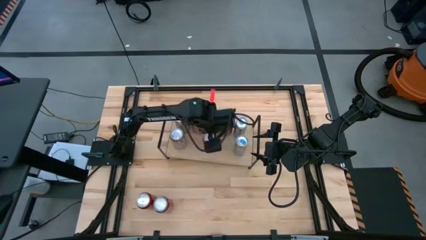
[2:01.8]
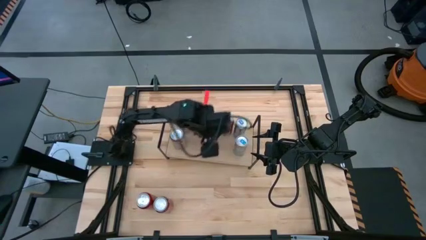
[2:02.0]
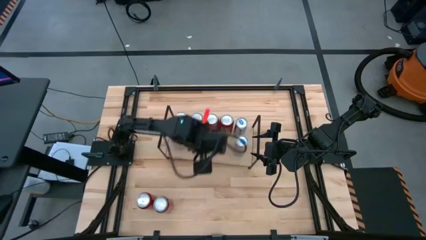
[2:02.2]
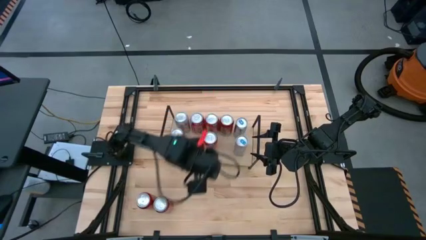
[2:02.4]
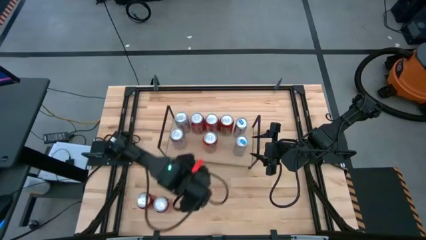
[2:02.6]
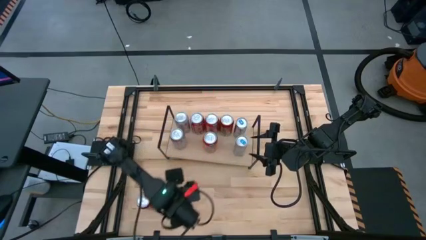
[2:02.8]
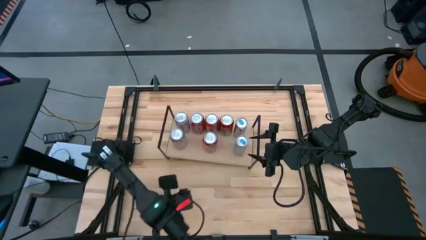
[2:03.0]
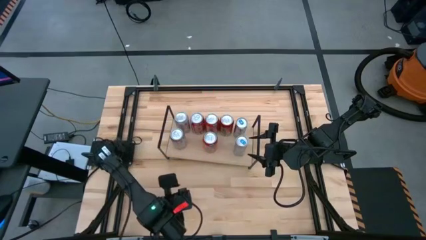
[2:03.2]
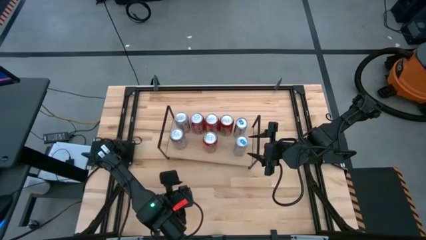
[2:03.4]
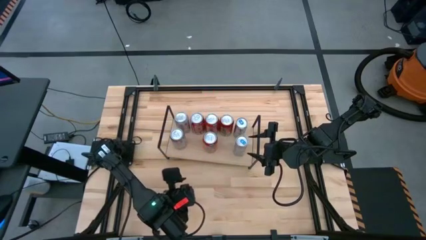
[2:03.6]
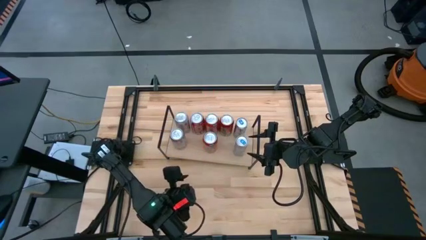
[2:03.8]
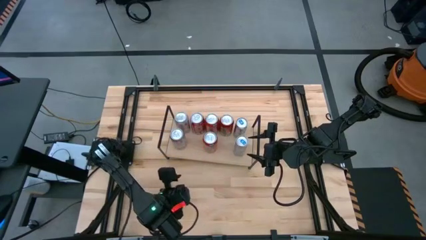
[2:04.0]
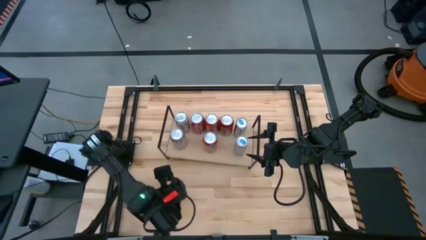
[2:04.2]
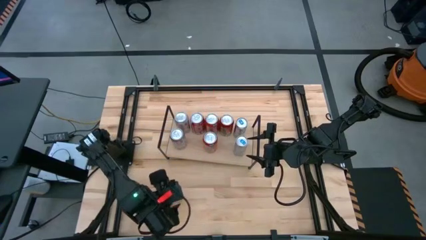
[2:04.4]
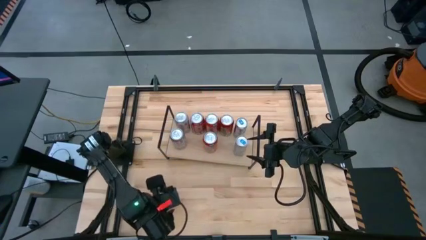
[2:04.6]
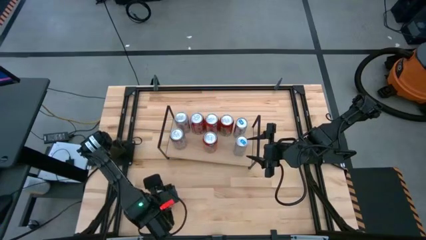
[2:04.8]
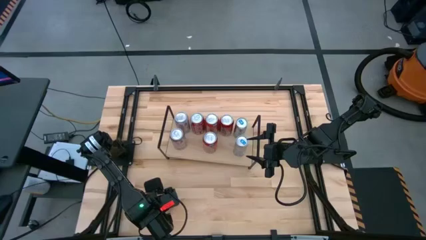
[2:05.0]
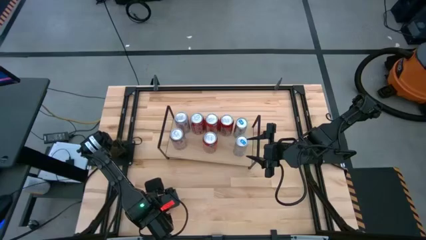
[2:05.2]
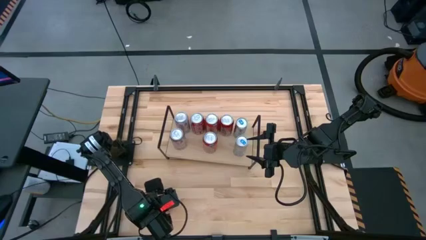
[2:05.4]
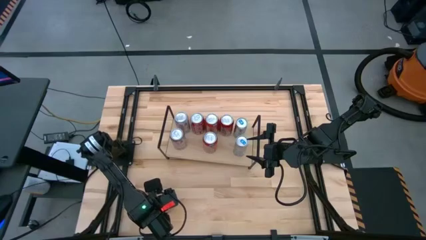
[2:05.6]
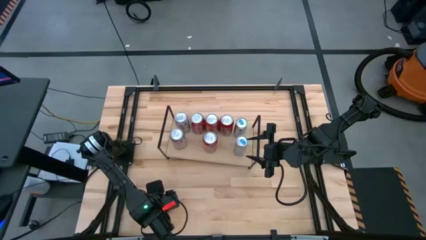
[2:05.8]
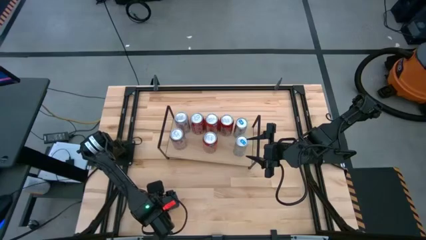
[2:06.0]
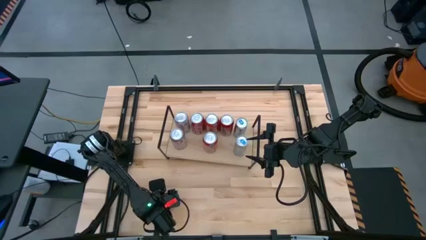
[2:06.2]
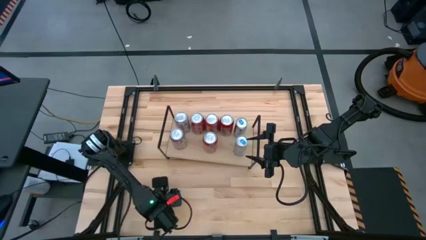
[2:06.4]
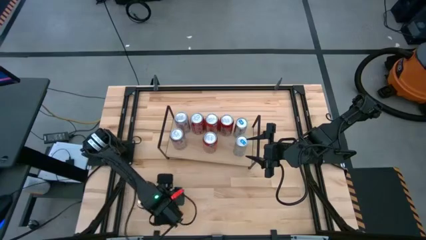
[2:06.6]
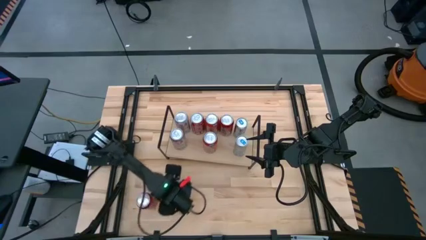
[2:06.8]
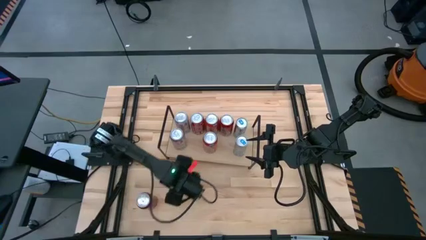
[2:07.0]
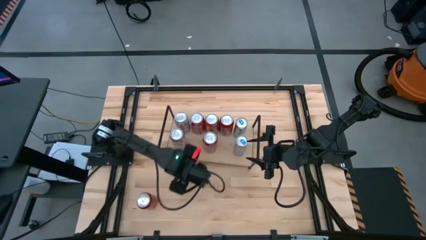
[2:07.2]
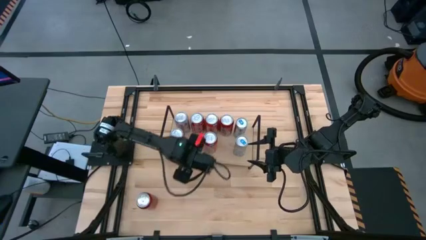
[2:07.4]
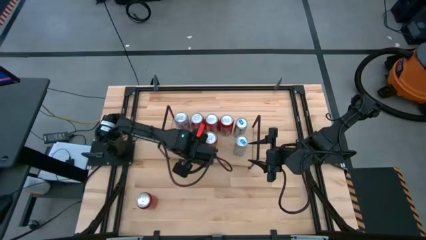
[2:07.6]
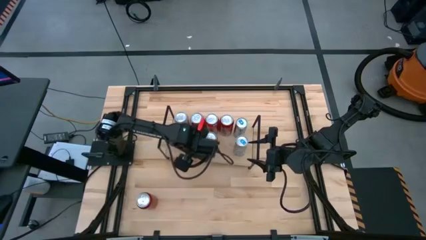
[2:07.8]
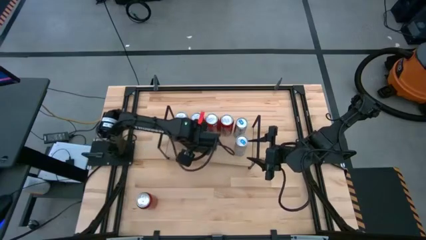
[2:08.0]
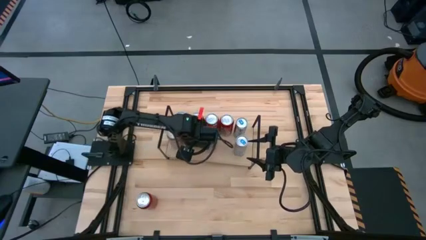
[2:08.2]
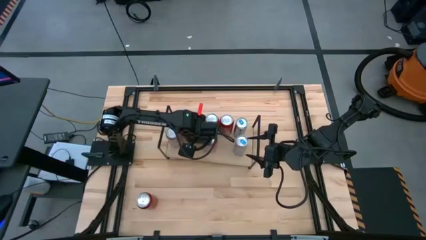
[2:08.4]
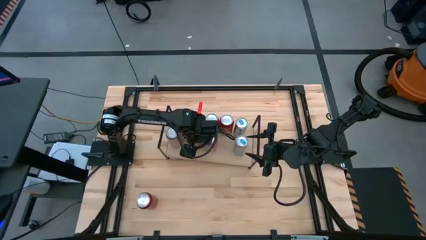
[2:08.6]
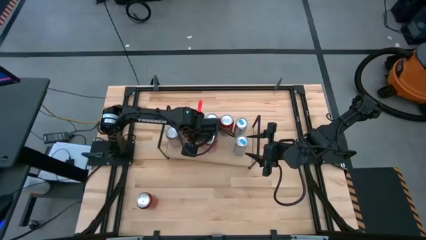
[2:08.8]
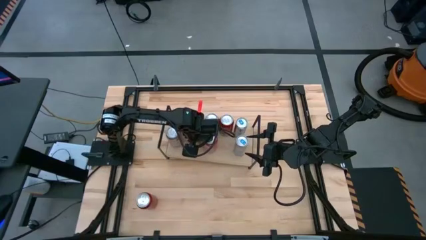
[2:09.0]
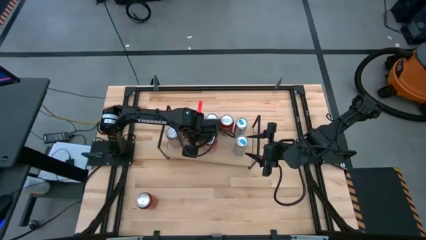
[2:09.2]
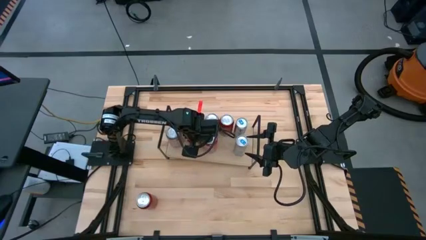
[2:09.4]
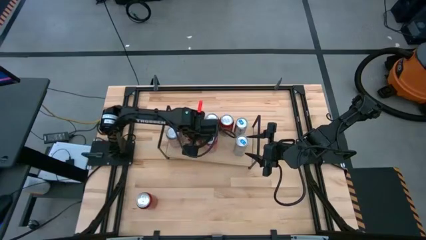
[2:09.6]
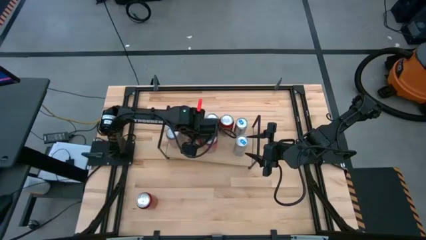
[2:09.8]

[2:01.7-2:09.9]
Task: Place canned beverage on shelf
Put the red-white soda can on the shelf aligned with the other red-white soda can

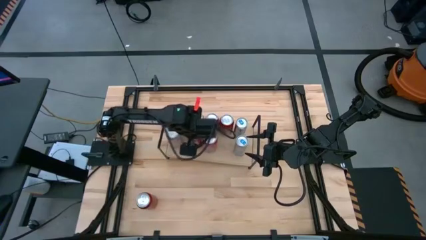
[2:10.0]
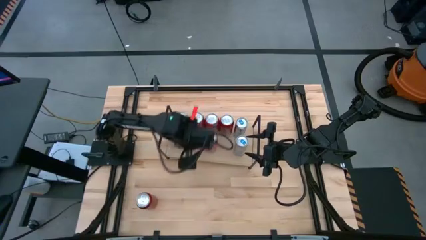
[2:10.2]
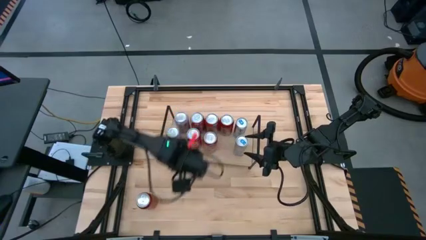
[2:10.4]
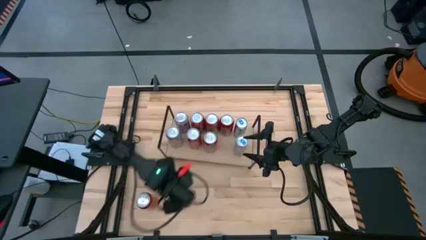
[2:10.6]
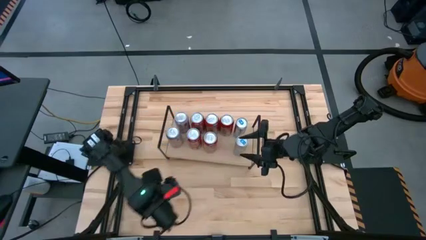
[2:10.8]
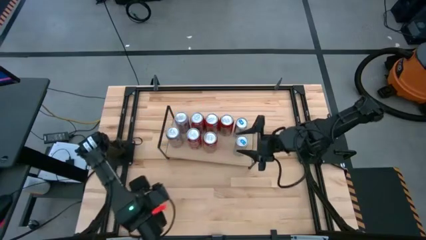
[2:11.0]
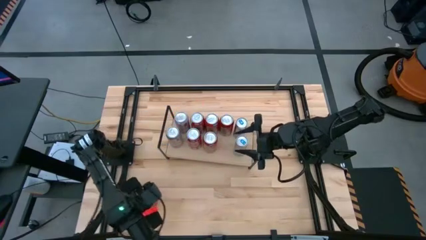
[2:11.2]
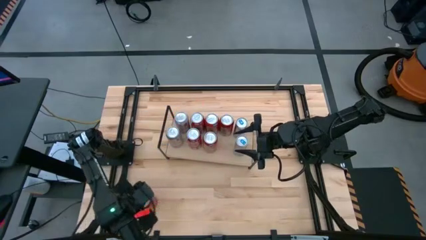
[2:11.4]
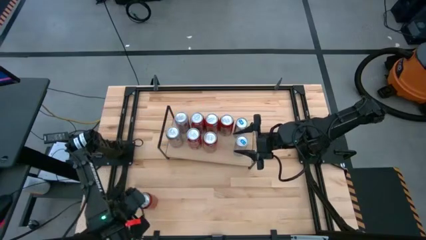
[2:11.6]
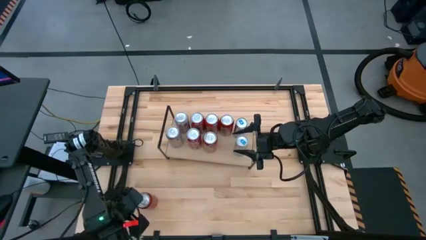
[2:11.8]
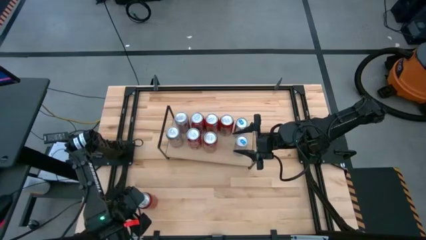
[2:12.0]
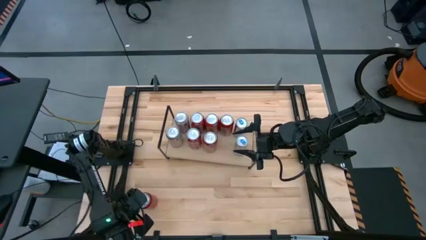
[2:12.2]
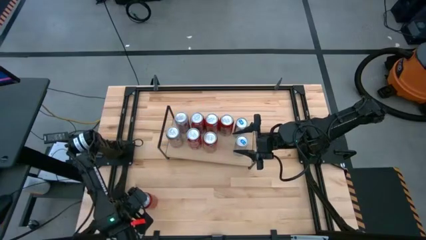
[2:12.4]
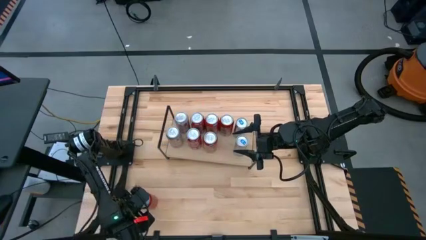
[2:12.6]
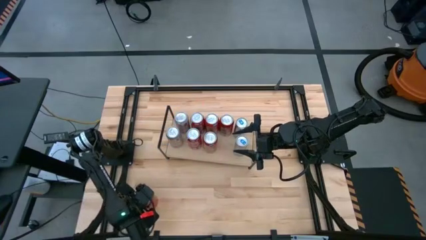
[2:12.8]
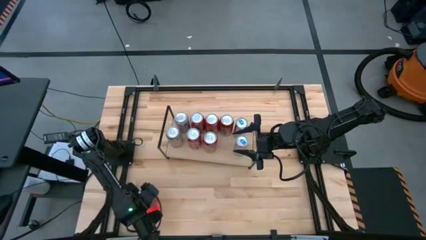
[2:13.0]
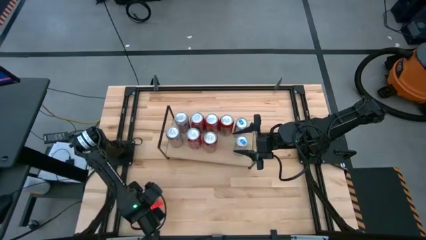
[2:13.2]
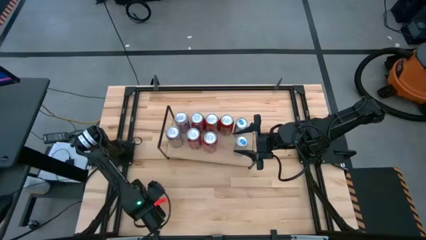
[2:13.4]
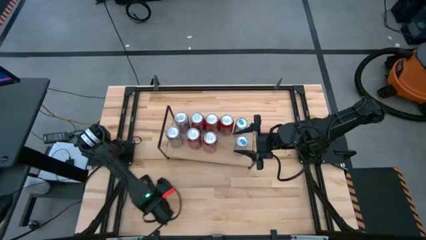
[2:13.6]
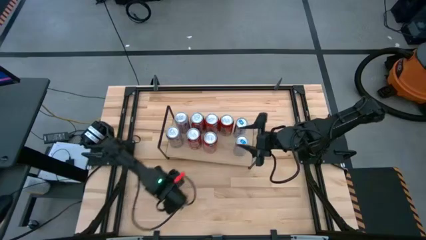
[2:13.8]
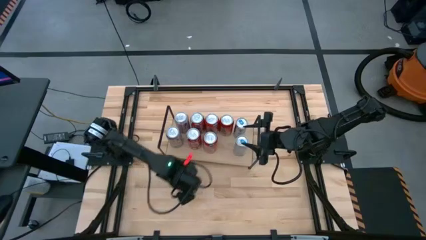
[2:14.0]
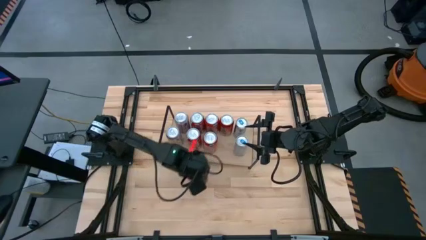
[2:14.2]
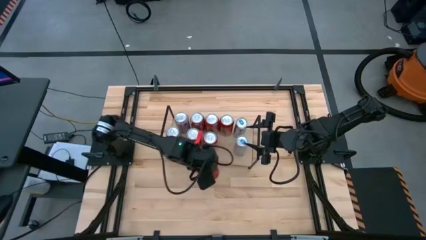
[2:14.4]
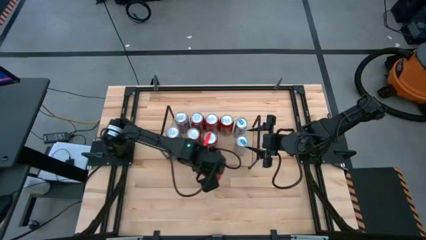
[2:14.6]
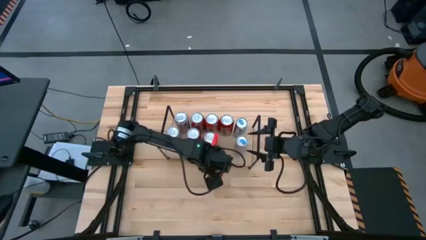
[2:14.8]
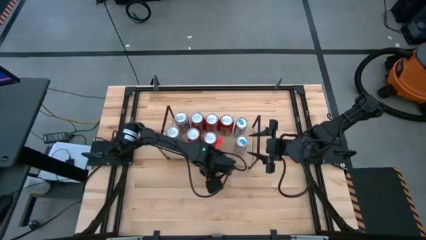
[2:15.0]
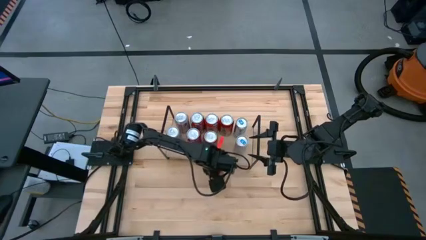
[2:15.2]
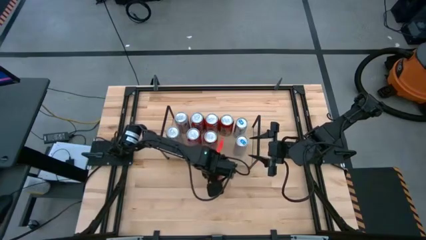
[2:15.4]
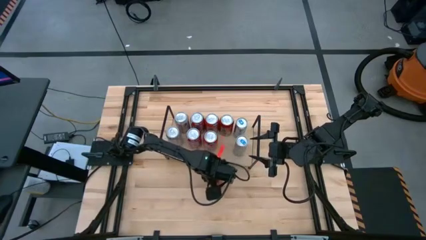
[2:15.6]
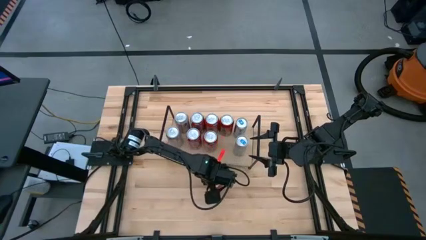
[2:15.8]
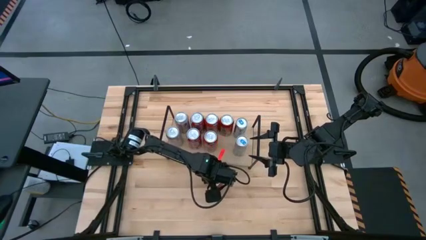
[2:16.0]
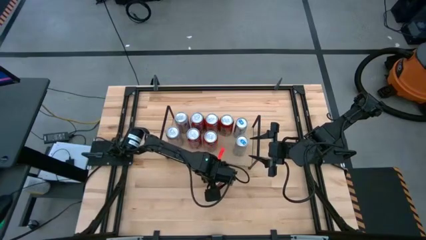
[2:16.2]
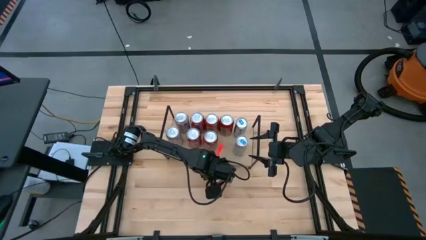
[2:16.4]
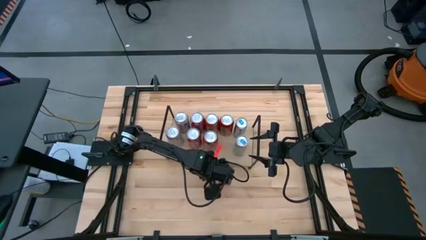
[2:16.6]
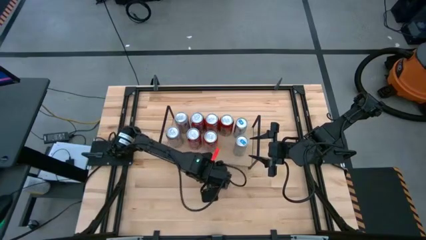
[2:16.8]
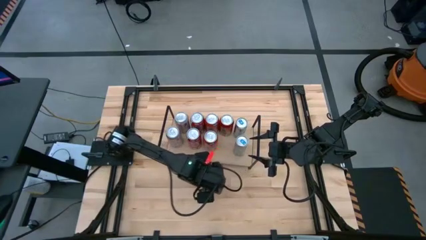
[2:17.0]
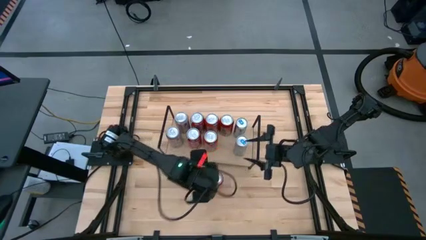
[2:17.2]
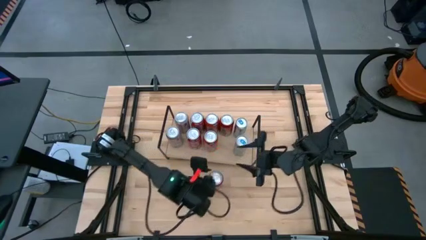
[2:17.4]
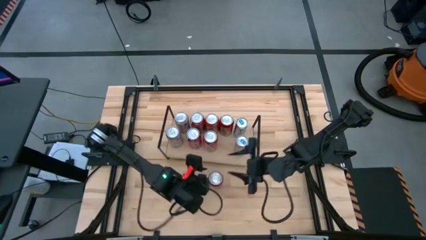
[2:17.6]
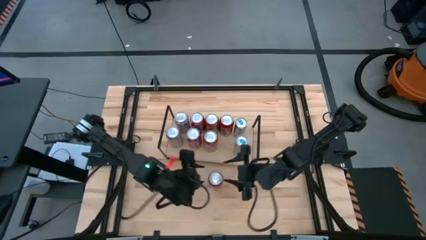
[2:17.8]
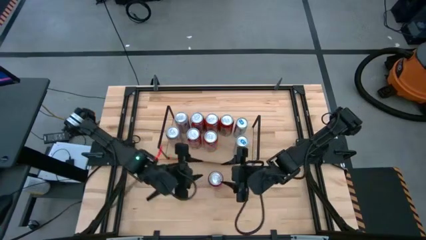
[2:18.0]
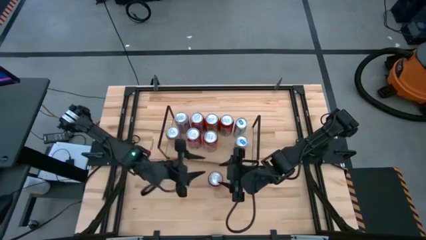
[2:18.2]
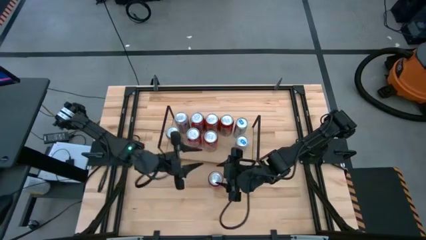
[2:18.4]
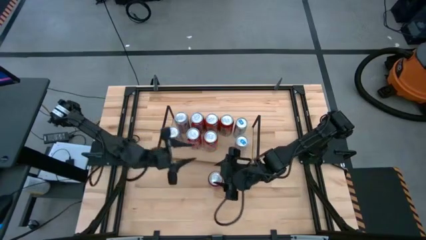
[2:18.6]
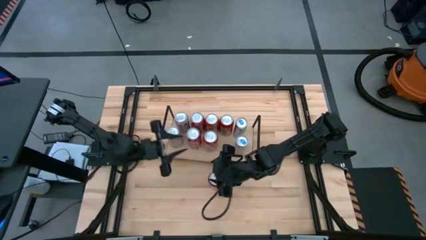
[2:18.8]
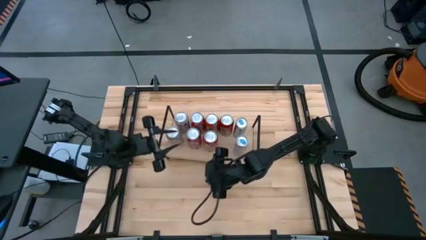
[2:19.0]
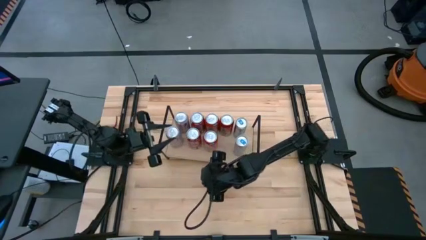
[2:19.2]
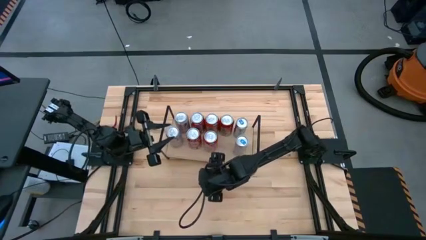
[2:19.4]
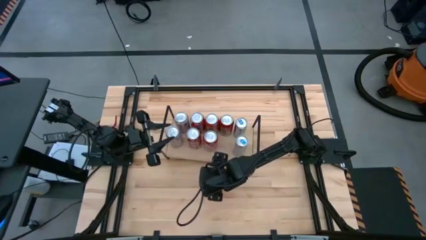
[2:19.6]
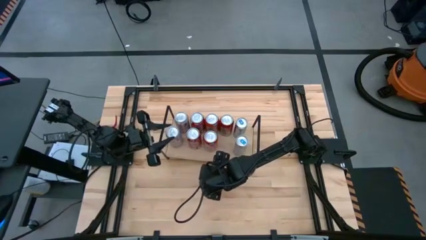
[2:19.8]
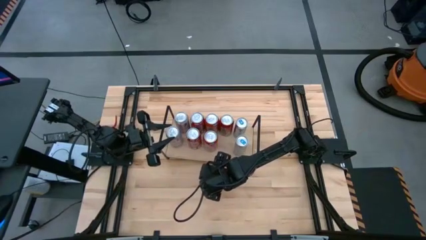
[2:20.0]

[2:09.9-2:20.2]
Put the red-black soda can on the shelf aligned with the other red-black soda can
